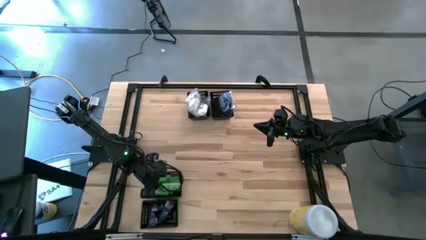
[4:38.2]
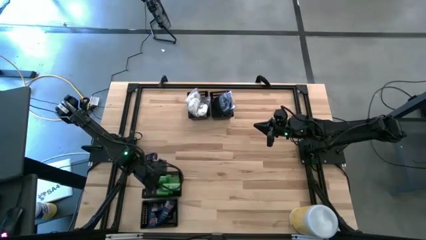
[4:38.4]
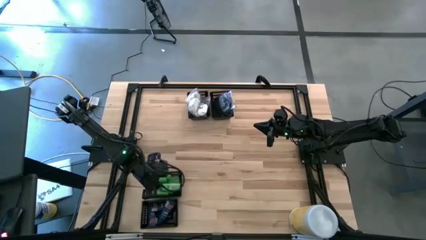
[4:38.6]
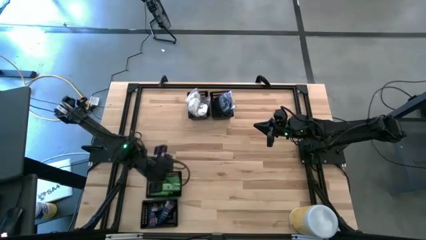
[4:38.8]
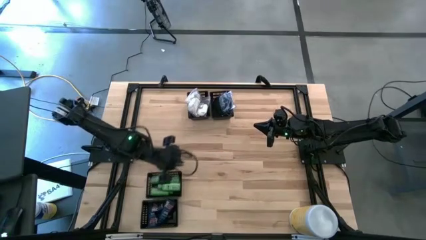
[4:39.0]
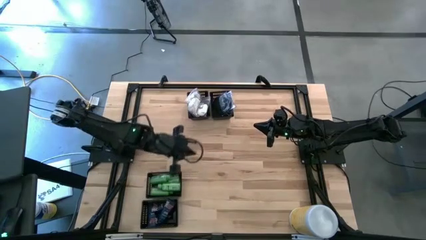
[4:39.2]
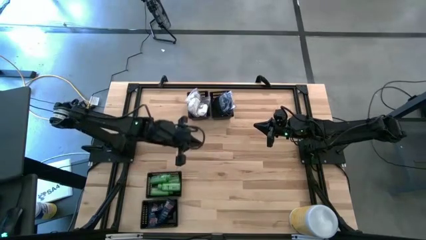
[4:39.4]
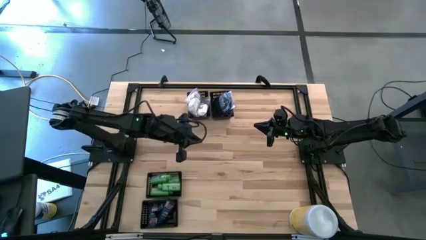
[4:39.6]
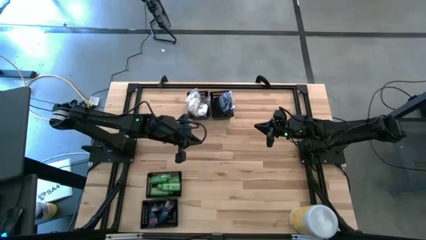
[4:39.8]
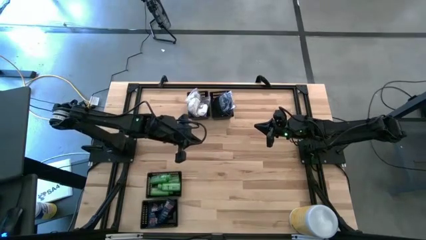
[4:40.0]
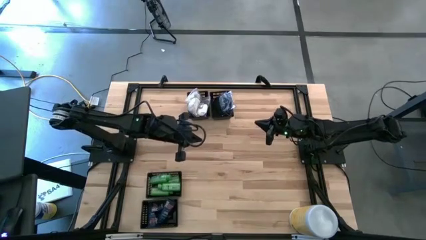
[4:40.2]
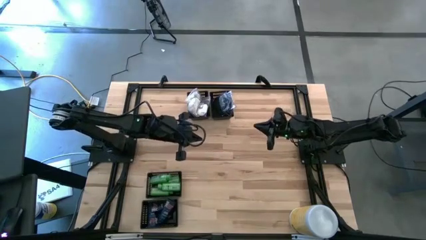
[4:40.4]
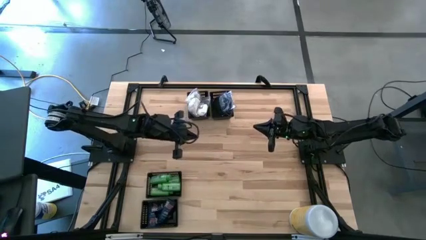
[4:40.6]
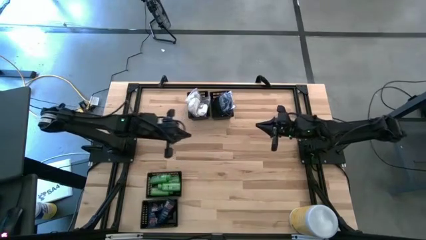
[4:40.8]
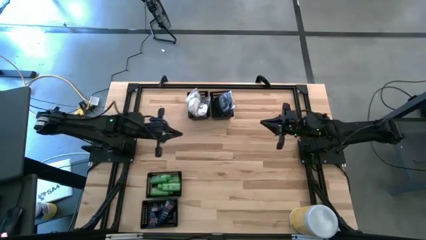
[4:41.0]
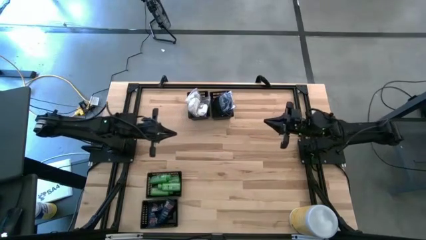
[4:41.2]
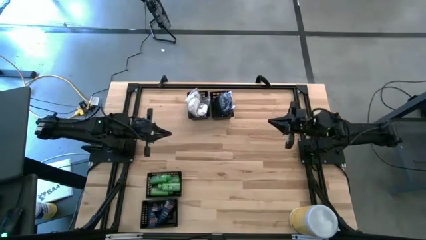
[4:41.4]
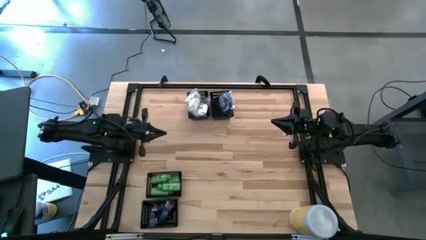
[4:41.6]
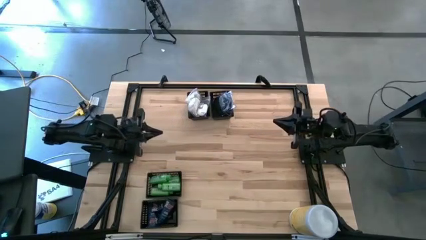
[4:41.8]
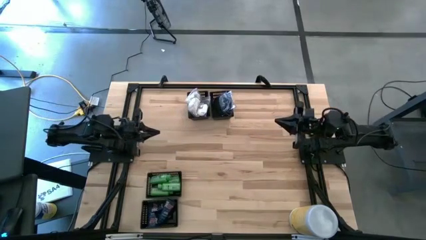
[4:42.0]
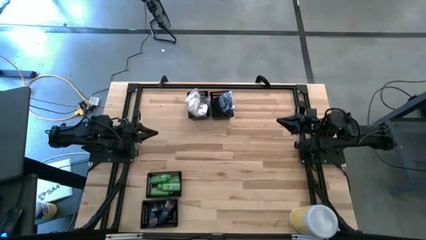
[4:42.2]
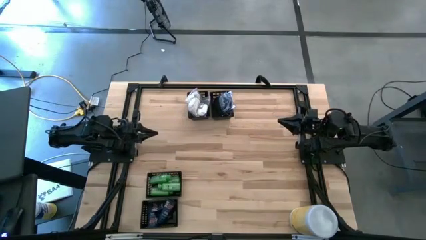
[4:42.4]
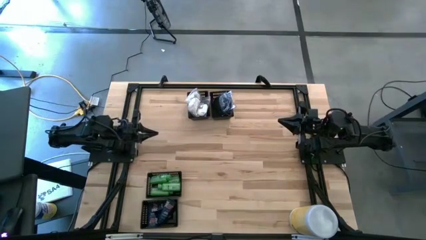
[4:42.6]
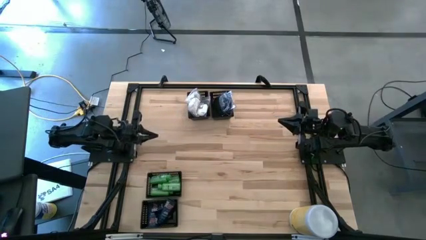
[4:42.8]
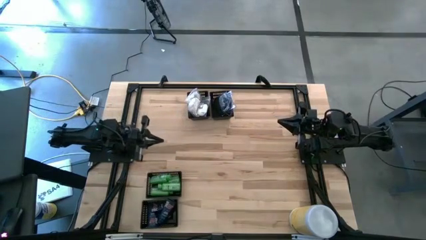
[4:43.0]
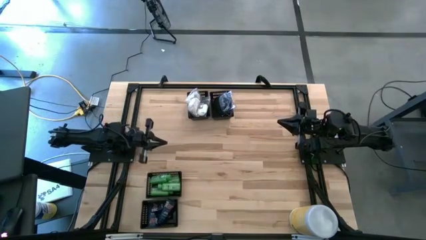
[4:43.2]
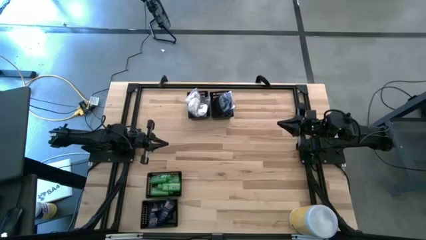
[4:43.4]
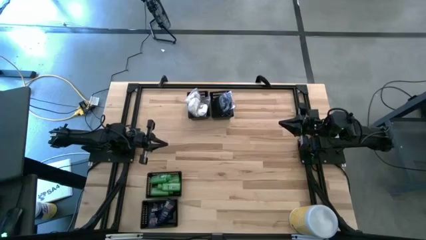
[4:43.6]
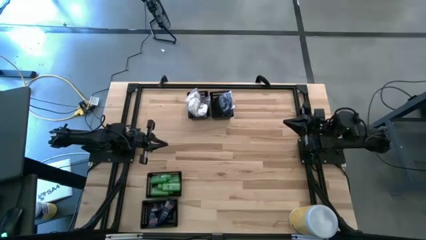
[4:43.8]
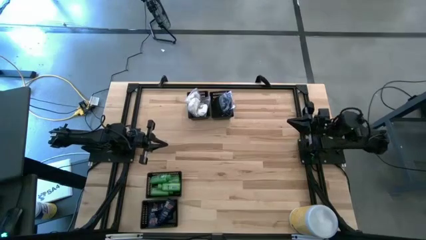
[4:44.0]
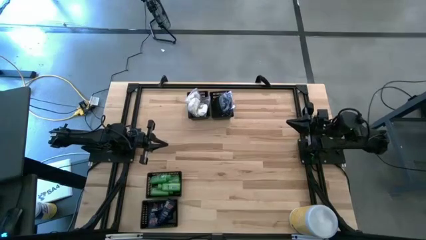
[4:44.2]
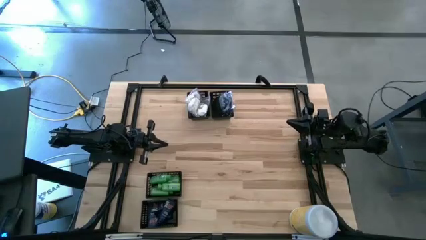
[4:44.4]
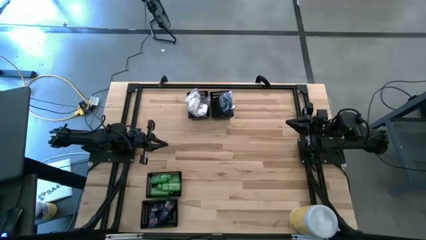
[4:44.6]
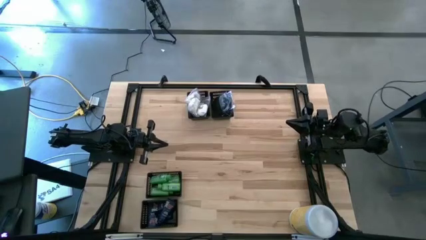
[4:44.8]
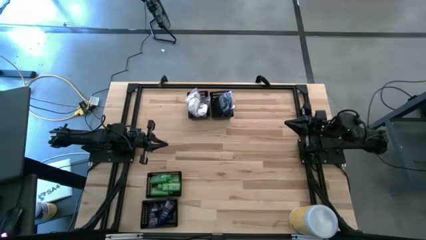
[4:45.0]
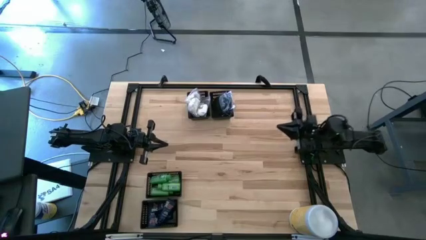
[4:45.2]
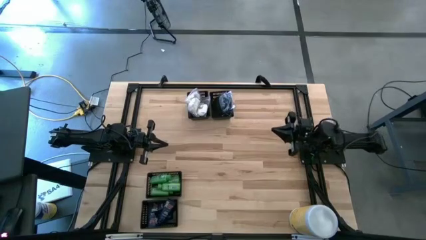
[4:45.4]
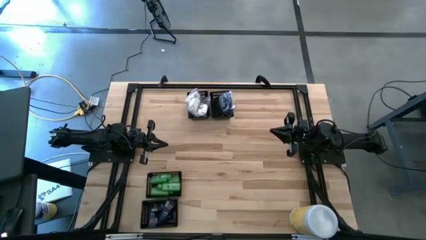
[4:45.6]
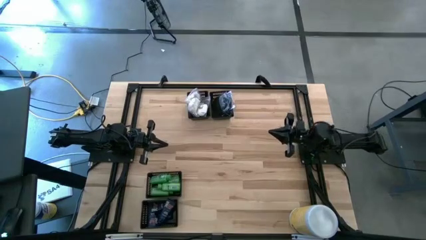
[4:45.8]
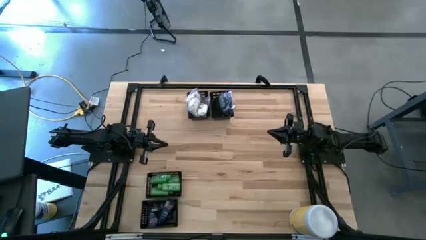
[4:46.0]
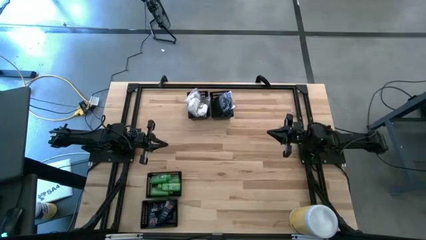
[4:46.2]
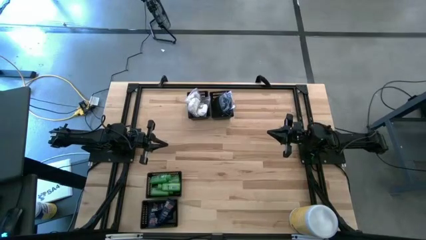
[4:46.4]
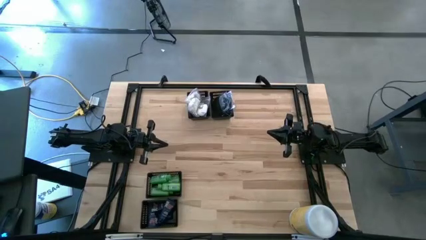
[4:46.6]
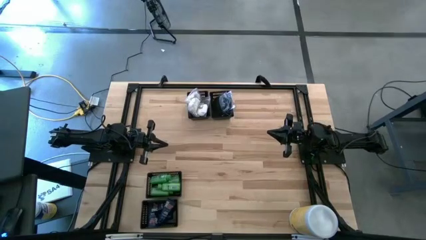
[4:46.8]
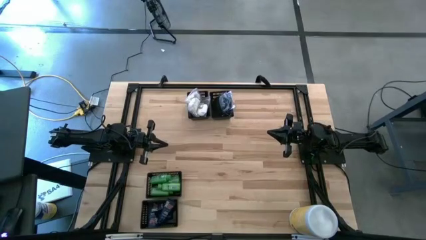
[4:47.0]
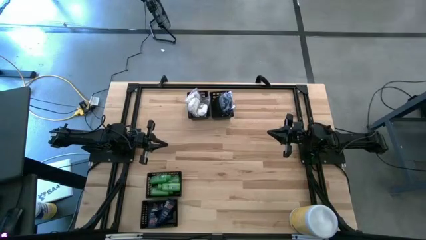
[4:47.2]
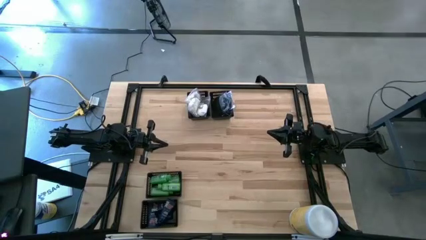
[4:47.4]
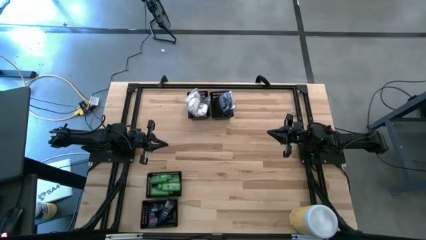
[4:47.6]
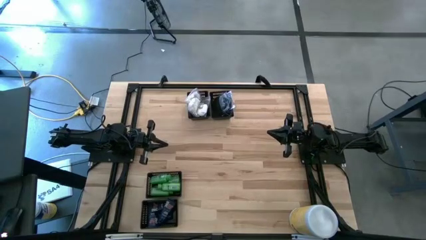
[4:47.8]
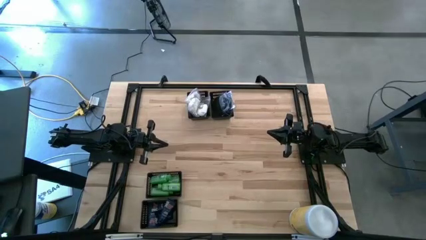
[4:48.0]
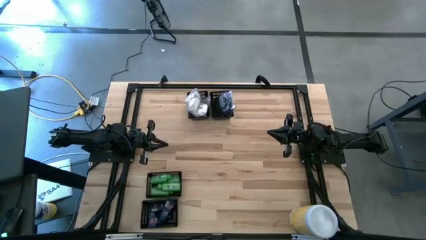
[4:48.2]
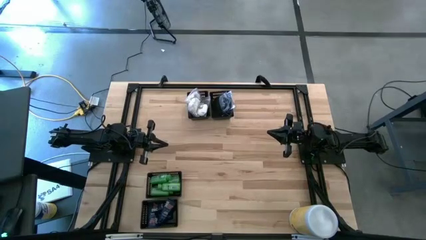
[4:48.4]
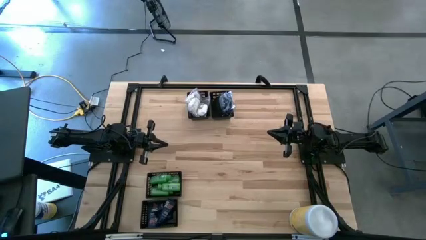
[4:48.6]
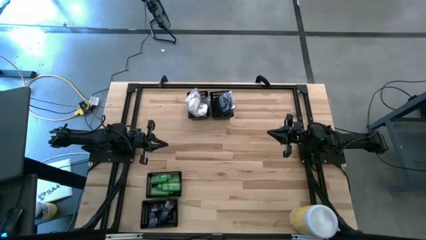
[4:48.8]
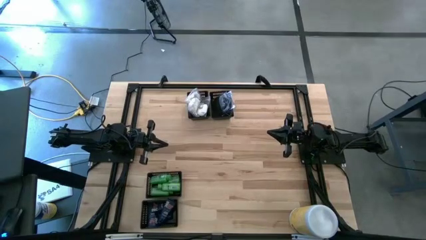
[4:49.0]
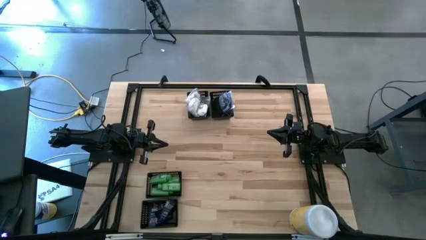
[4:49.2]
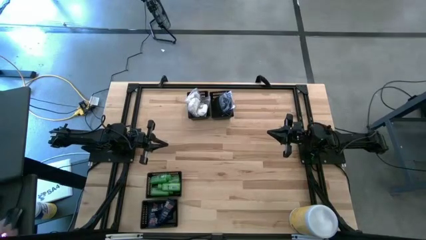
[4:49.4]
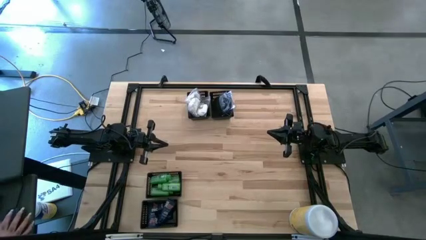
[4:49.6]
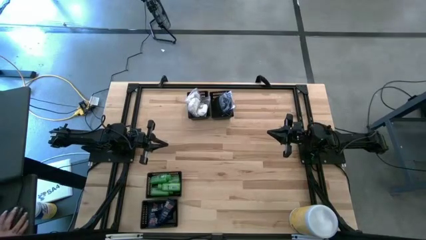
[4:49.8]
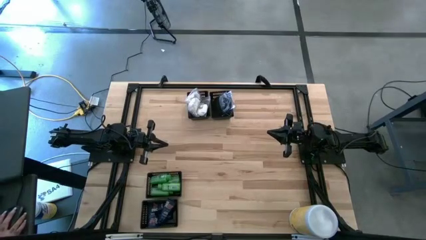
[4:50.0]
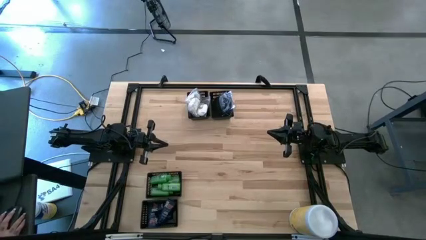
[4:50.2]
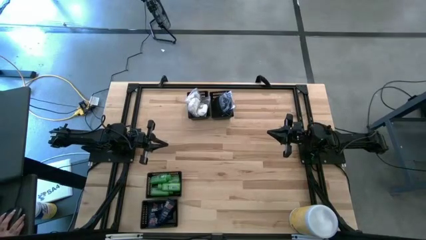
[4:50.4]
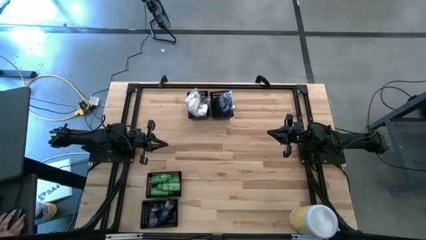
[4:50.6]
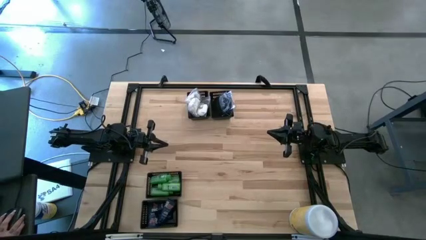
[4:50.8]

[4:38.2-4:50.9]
Task: Pick & Place Travel size toiletries
Return to Home Position
